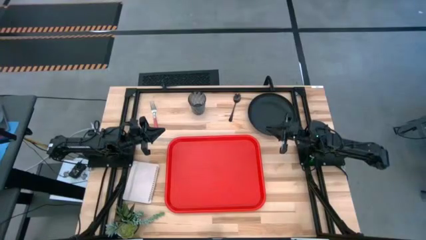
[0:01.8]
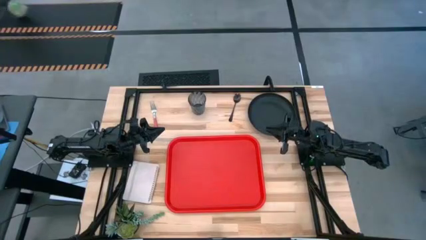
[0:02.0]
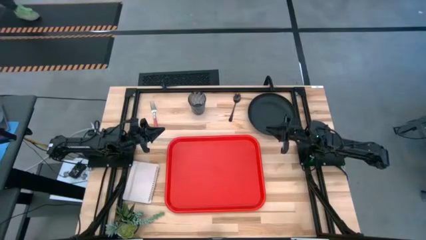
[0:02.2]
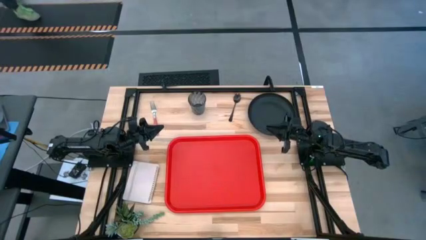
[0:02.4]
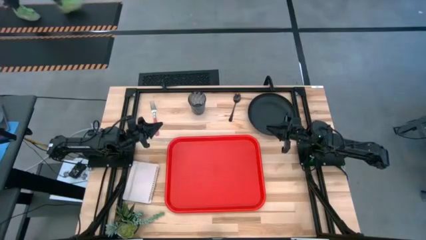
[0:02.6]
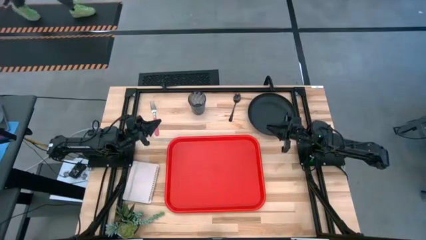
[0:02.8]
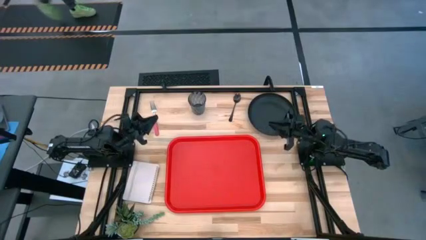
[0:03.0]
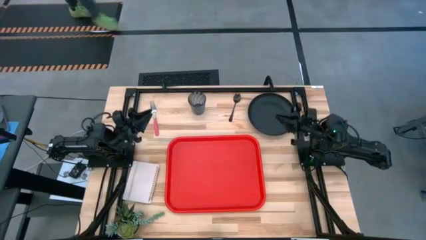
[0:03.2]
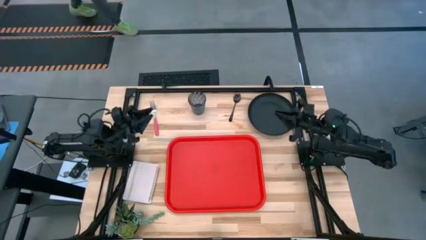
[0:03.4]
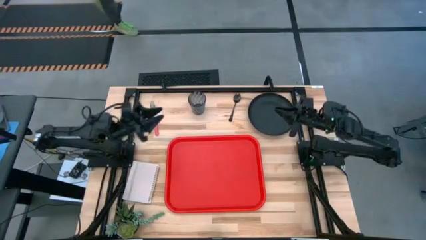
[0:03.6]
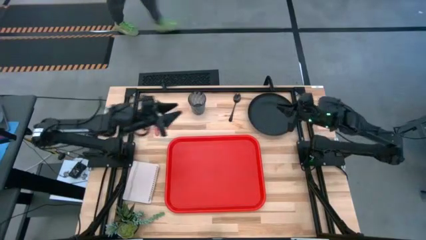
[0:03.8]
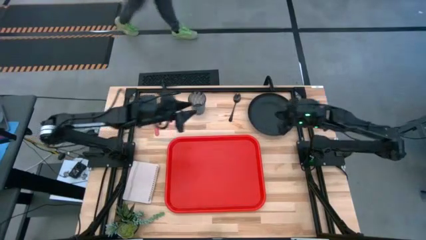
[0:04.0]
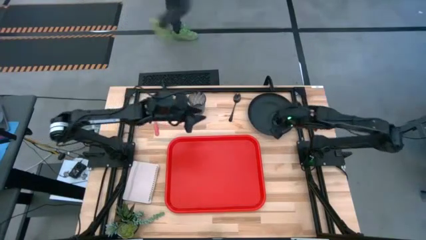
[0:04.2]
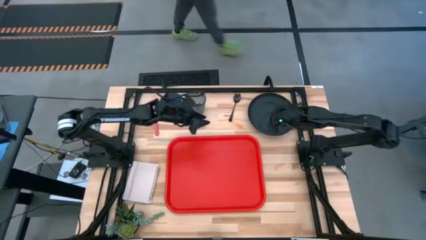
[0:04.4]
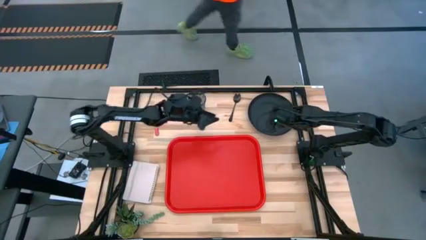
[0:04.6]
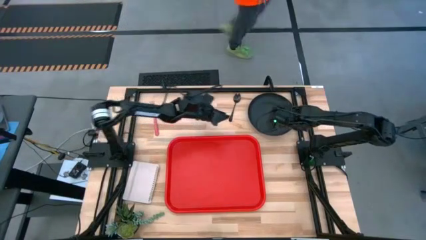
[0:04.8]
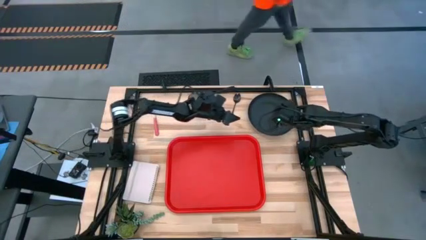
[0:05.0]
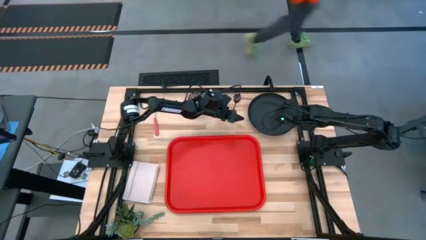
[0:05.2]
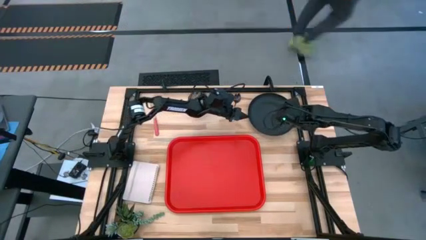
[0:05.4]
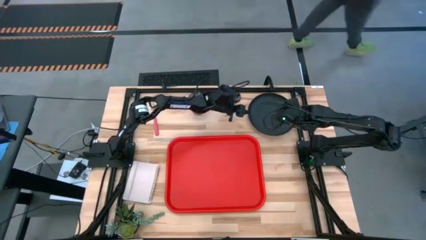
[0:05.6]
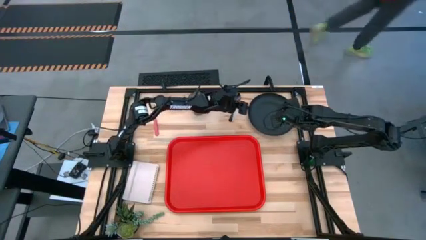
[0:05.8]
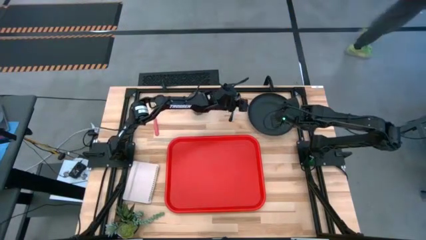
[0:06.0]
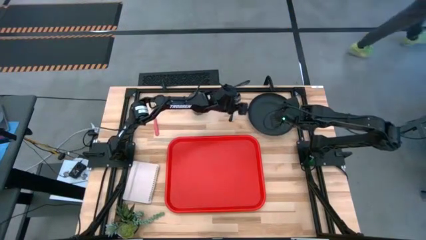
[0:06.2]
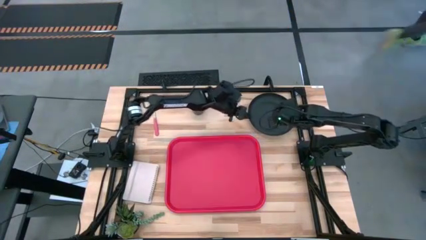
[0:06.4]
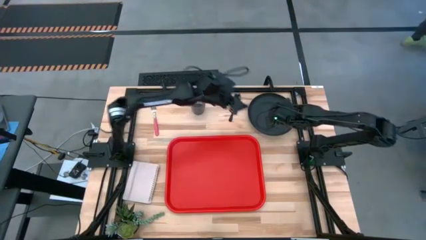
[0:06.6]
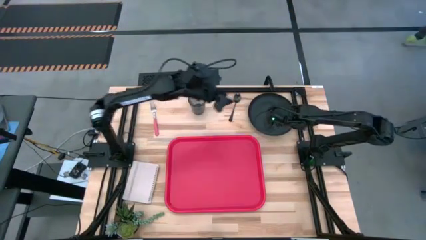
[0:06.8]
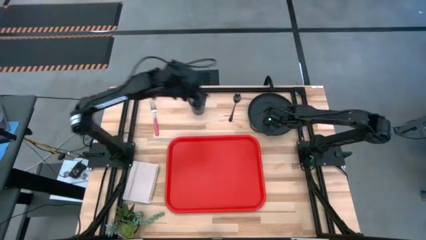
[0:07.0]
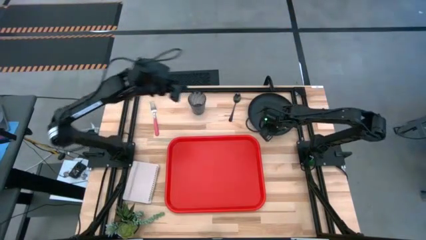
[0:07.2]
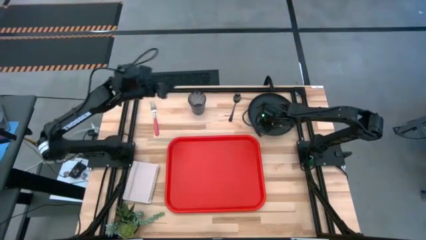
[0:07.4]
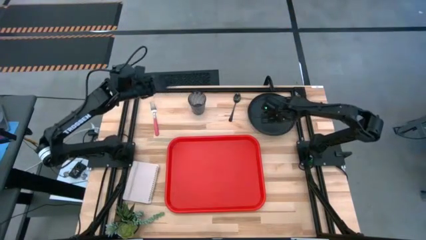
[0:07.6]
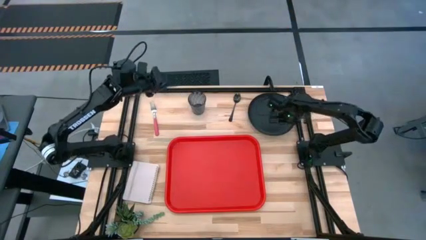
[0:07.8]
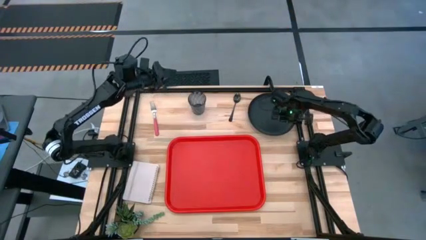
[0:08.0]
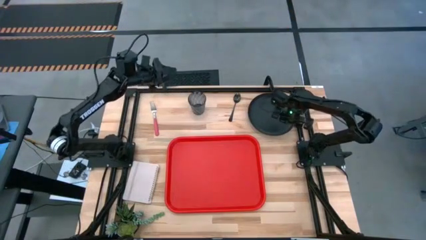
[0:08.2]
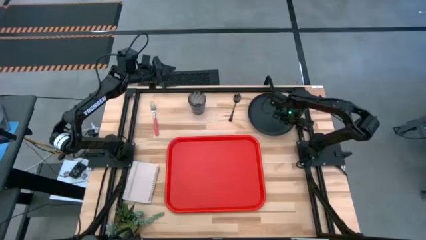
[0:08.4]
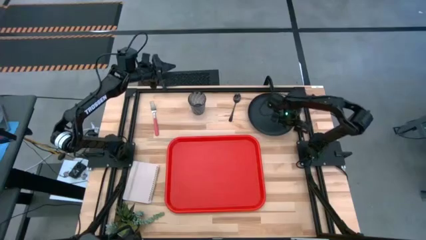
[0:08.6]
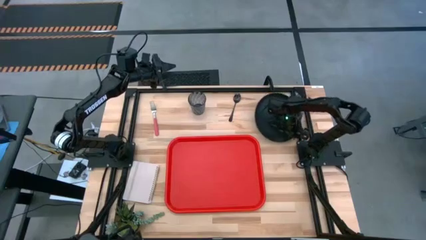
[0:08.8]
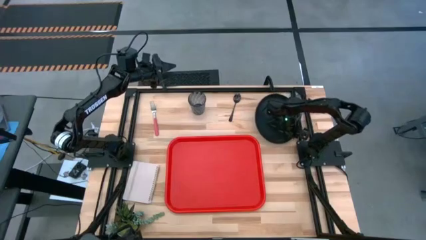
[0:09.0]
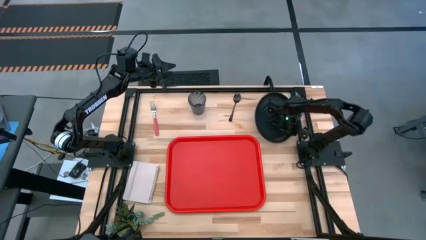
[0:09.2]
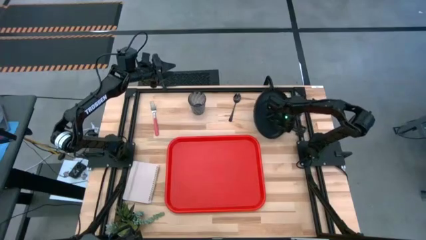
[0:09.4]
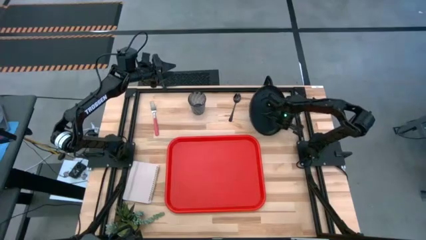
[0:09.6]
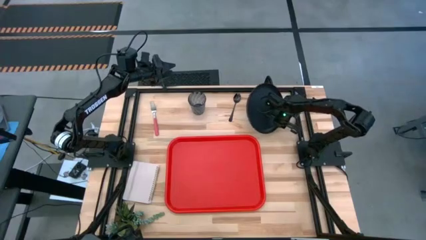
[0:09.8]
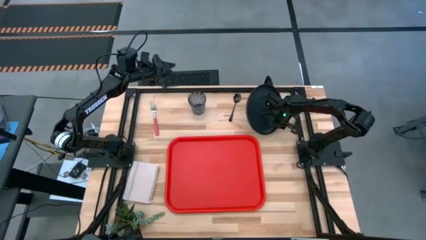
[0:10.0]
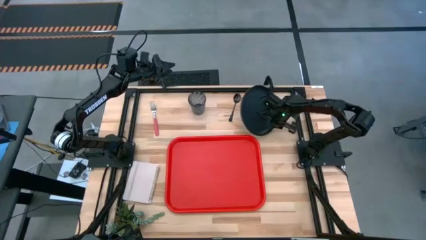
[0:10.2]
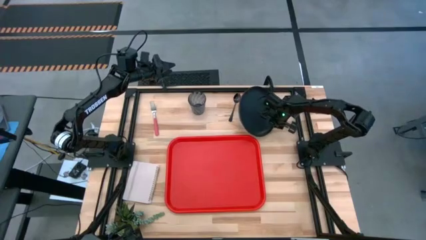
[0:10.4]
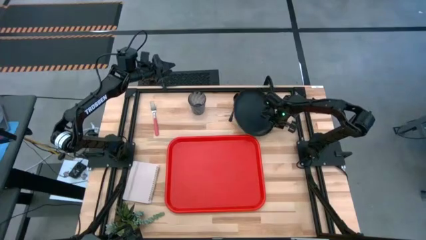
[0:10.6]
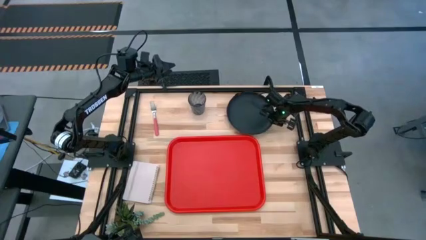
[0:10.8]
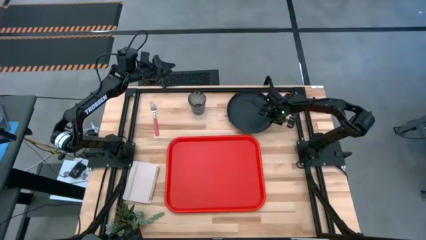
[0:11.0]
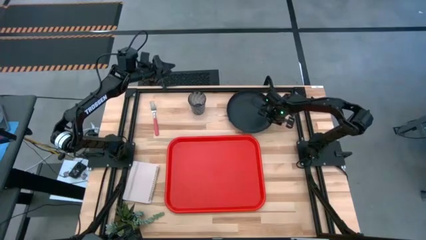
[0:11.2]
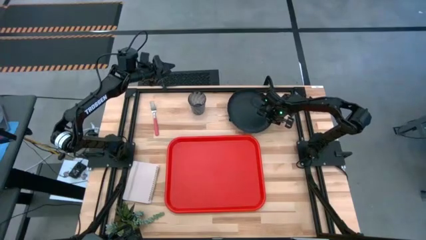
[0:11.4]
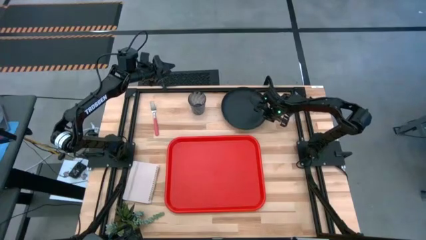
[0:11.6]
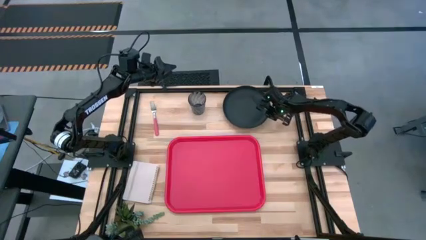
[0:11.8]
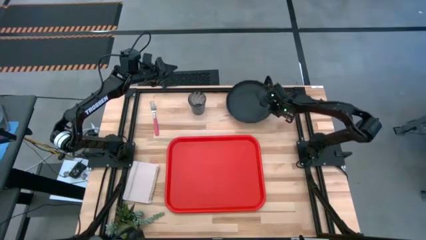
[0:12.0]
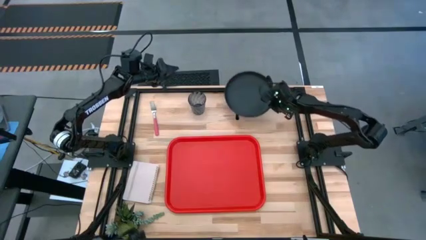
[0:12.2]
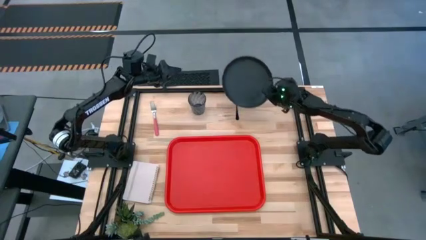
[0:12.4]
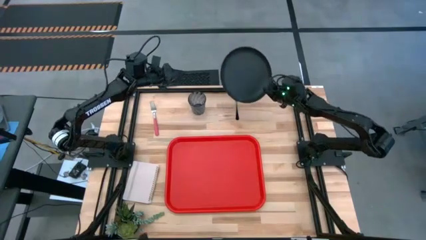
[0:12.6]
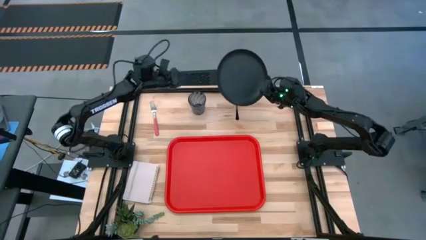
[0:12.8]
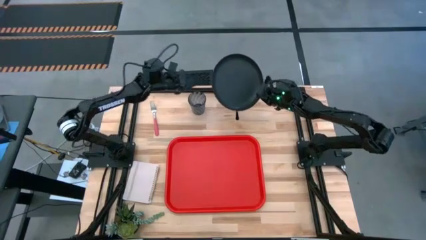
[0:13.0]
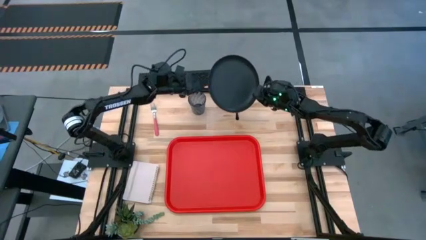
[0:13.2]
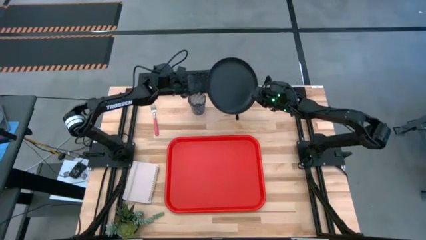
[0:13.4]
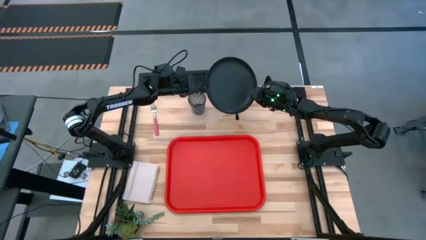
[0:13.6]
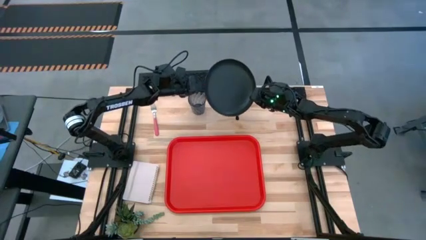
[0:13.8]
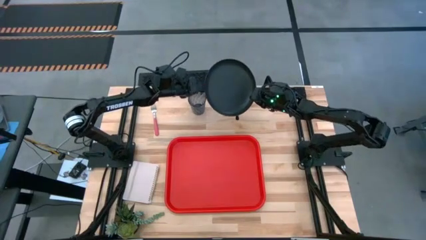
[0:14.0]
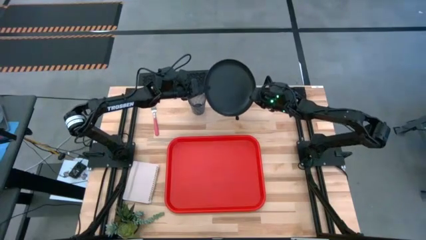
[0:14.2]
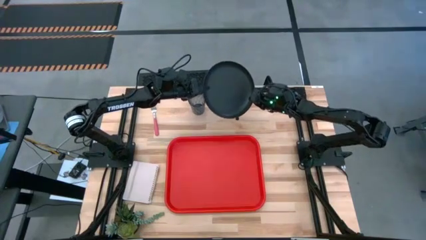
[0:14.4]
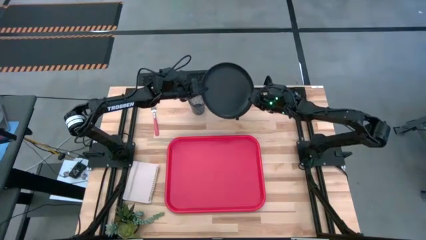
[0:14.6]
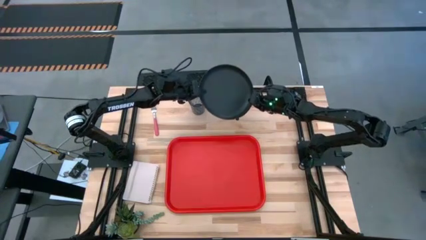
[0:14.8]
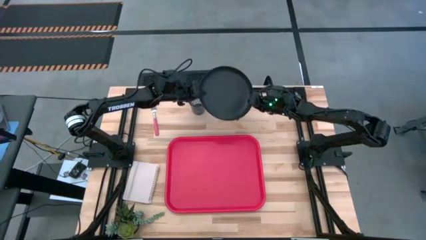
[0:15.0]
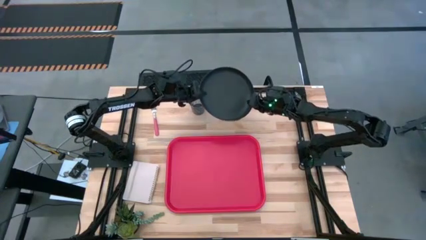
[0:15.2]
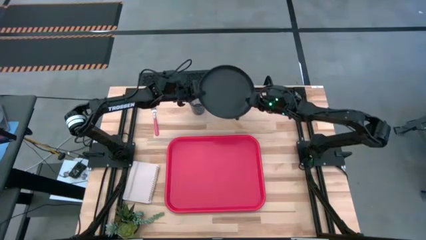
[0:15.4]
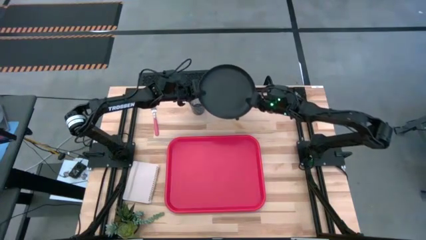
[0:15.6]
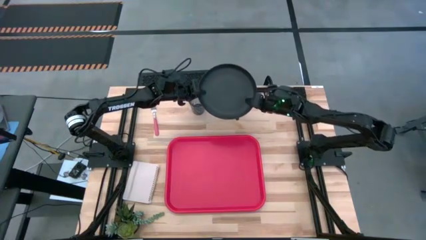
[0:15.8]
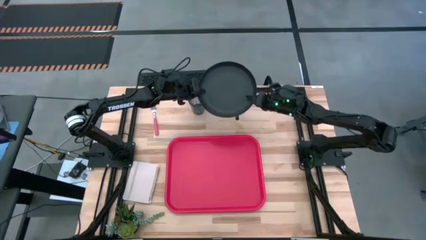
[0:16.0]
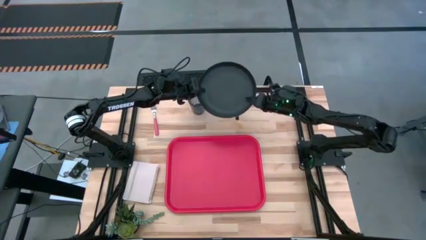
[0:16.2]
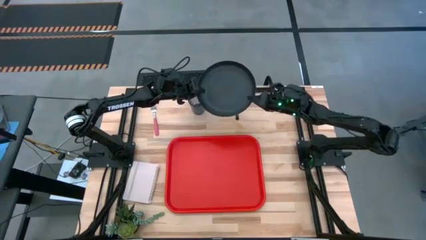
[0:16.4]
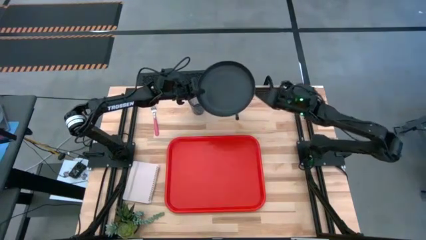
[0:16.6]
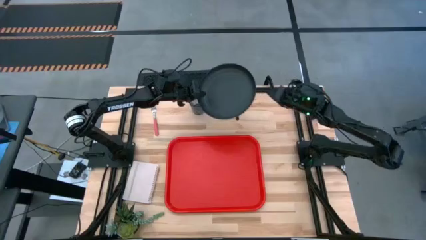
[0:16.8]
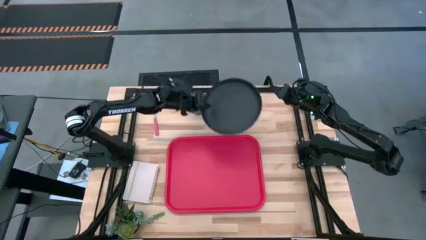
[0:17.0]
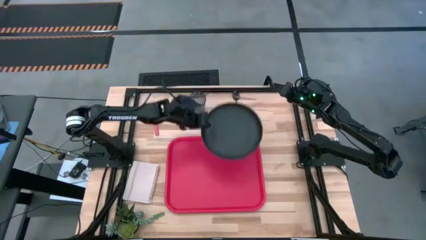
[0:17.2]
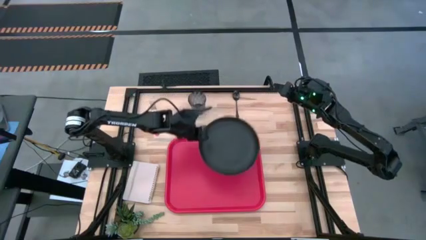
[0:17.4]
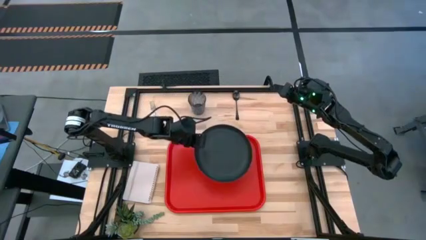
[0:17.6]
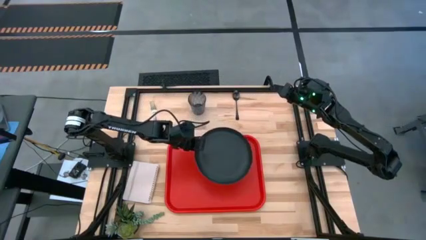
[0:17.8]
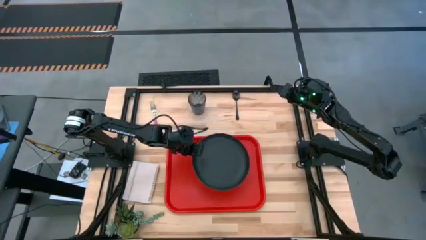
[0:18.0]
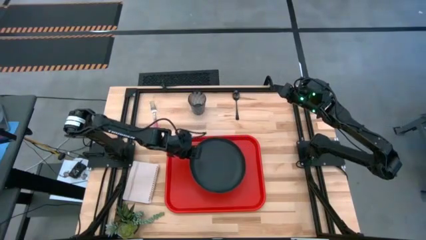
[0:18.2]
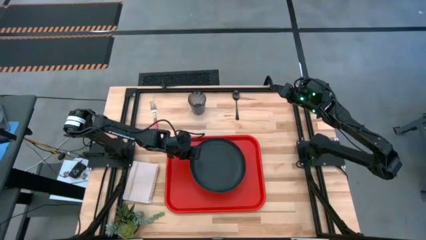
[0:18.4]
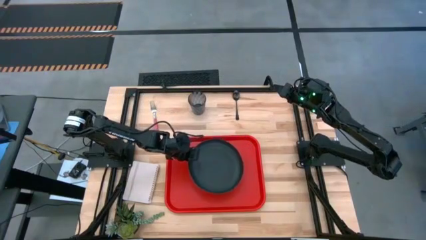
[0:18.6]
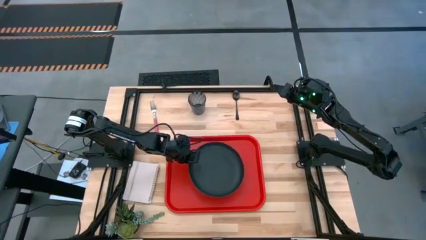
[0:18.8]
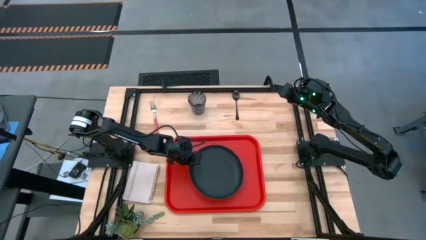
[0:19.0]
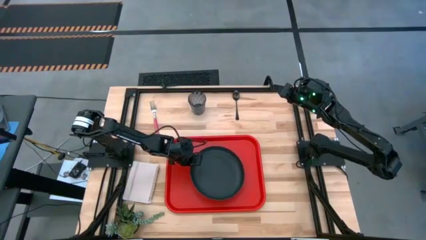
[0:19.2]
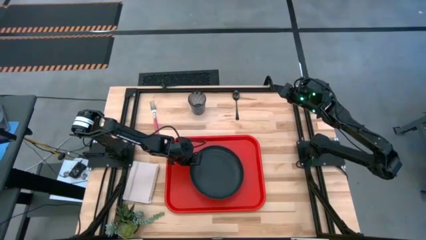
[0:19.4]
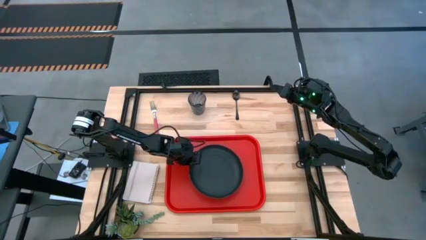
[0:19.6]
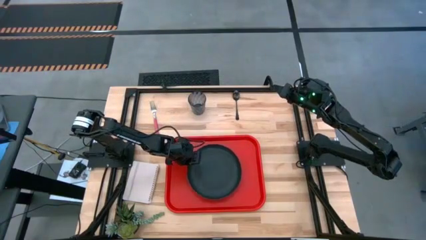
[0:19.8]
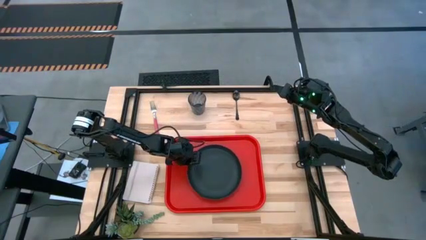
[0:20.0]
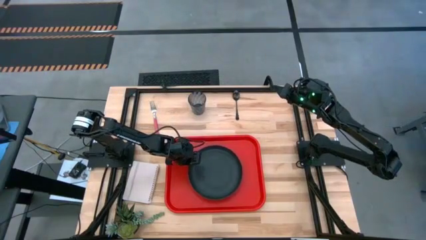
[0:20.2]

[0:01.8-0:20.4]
Task: Pick and place plate/cup/fork/spoon on tray
Put the black plate on the orange serving tray
